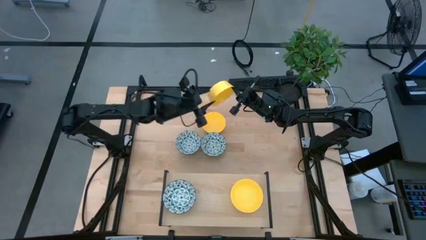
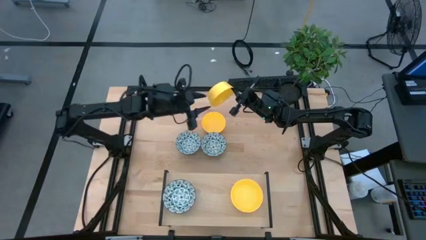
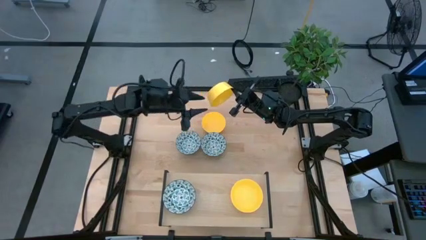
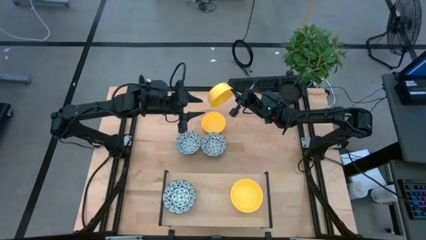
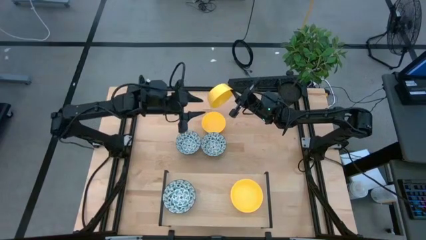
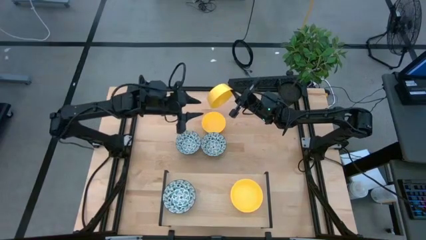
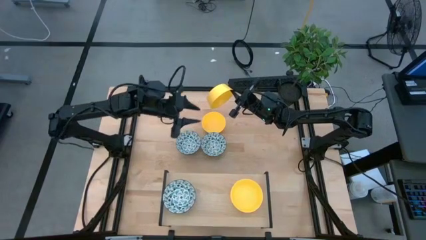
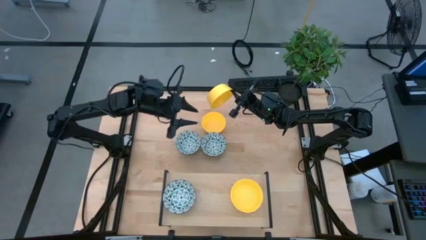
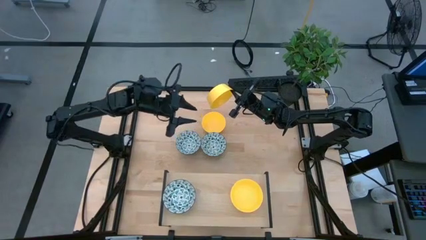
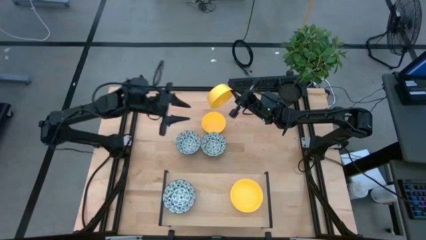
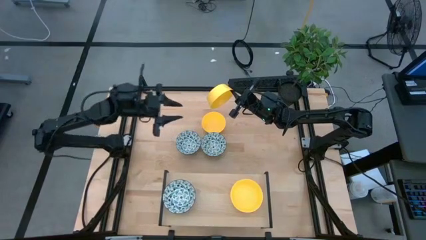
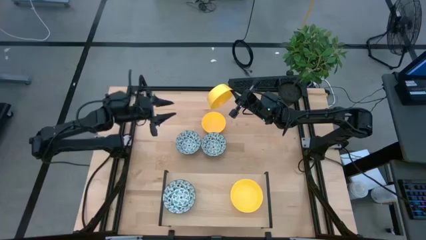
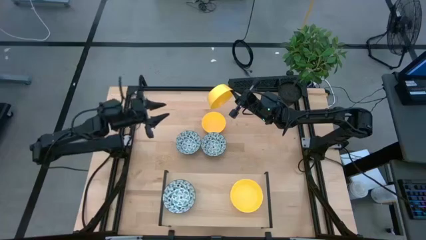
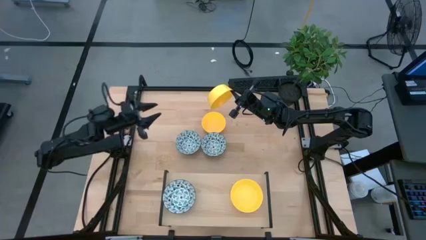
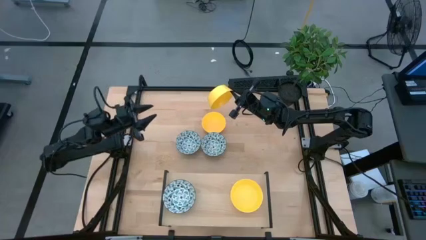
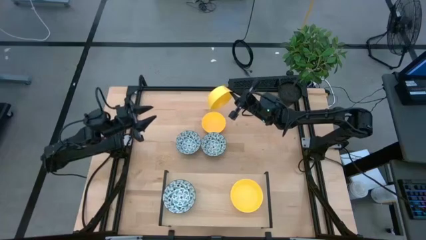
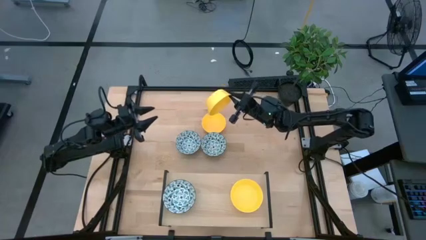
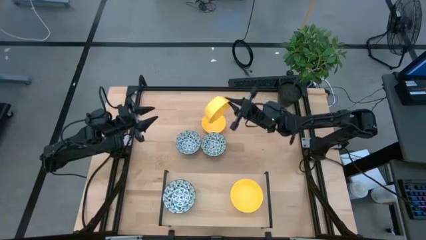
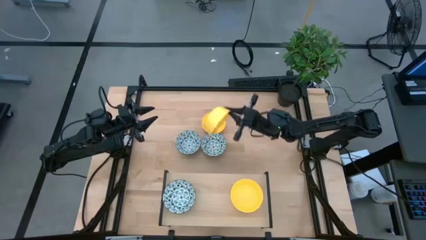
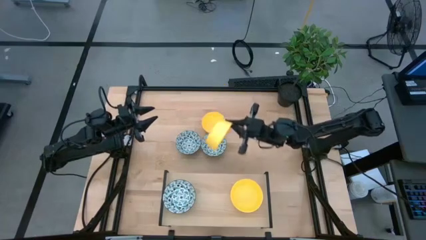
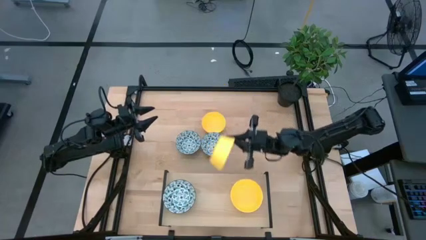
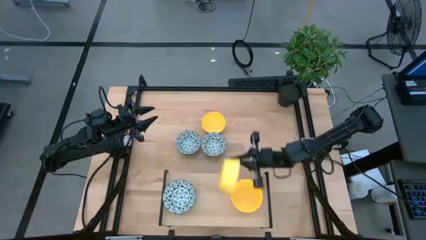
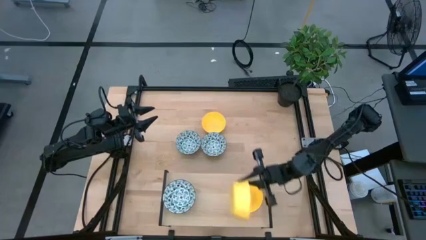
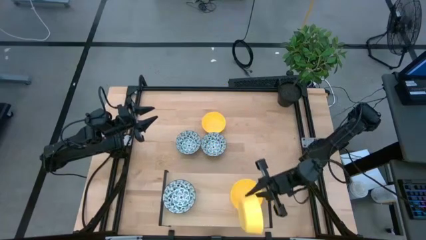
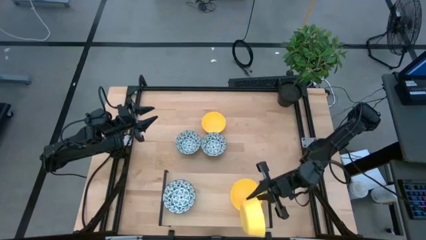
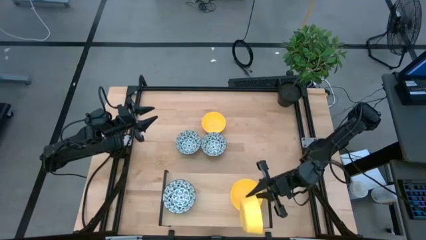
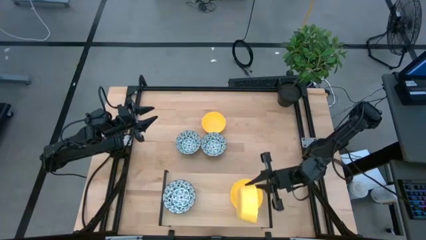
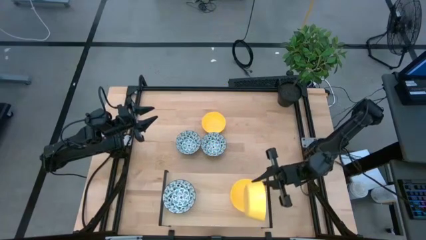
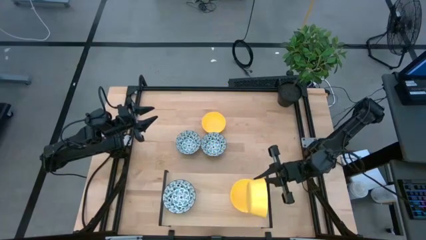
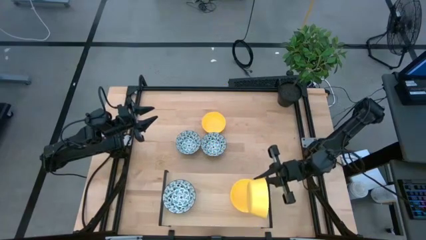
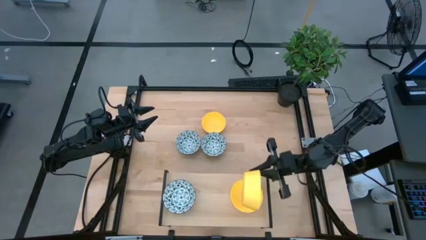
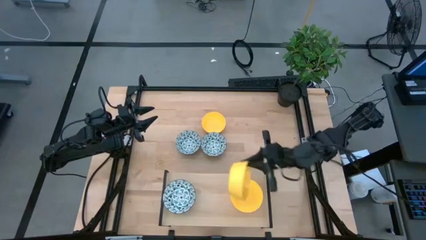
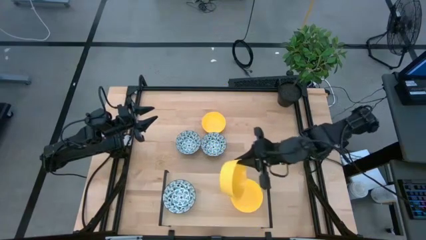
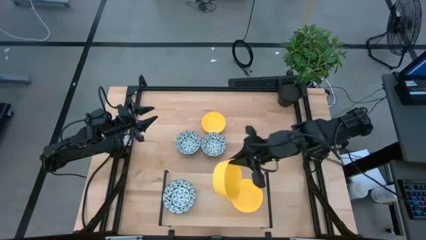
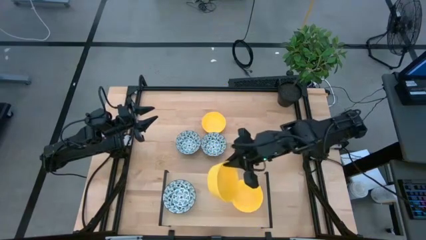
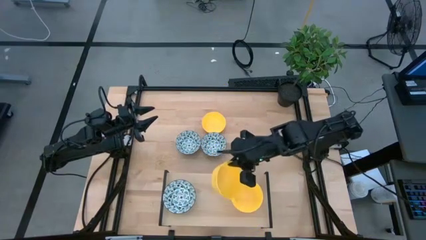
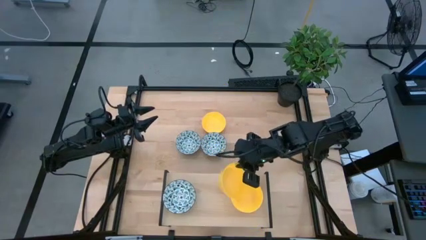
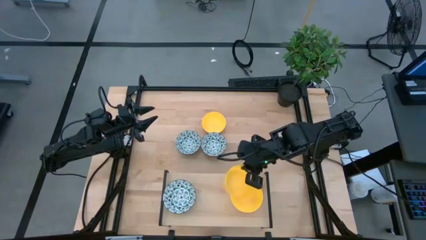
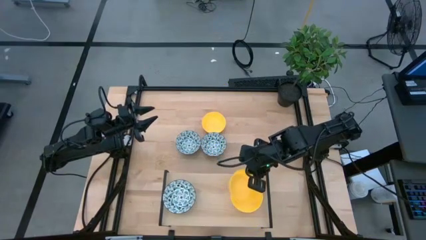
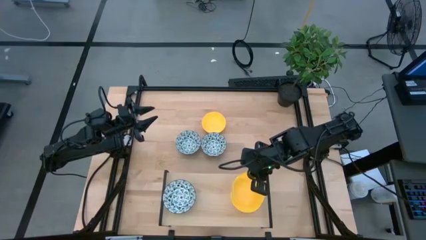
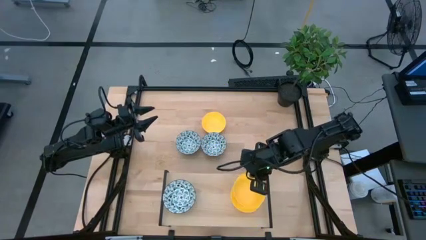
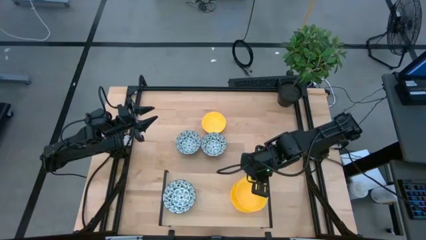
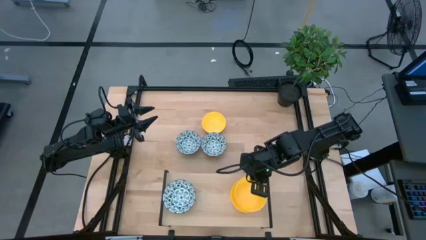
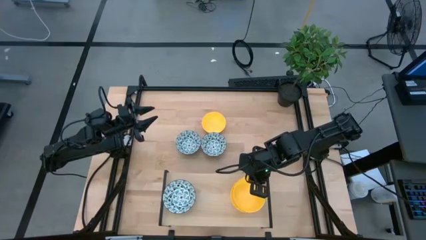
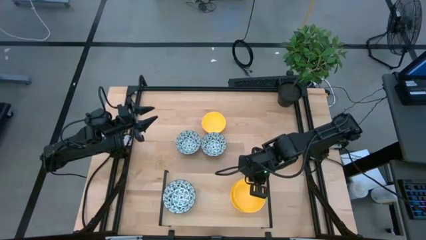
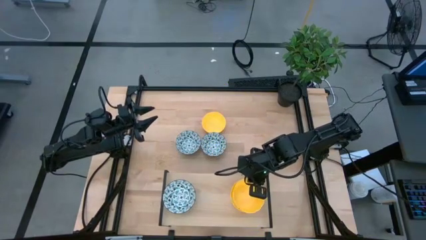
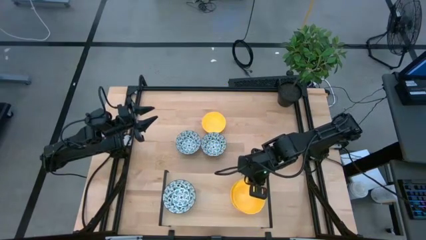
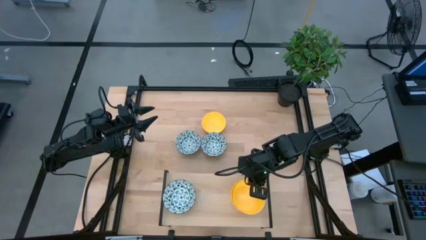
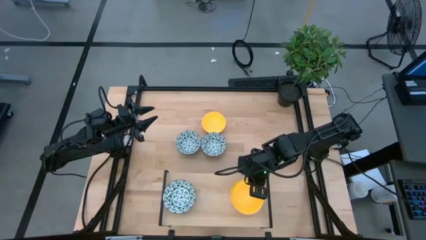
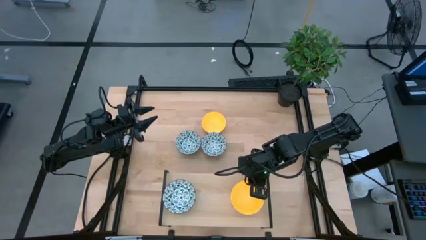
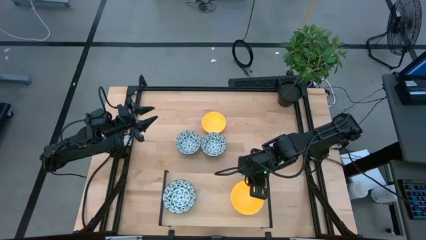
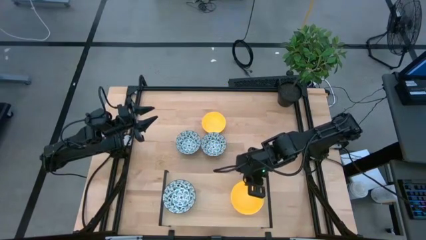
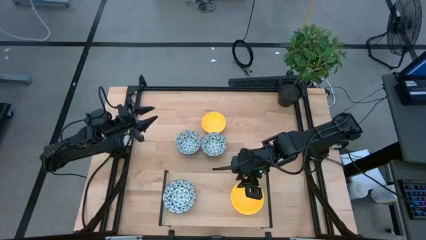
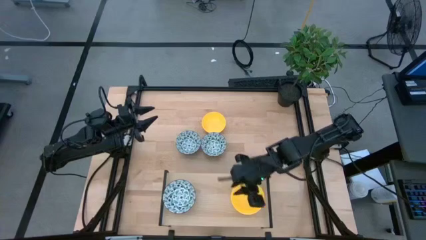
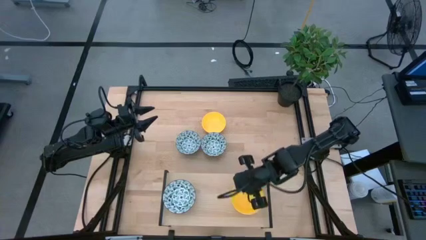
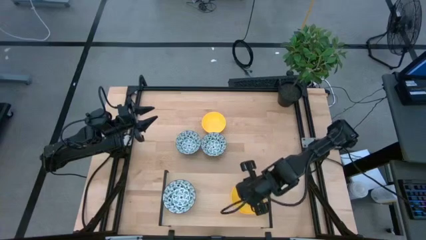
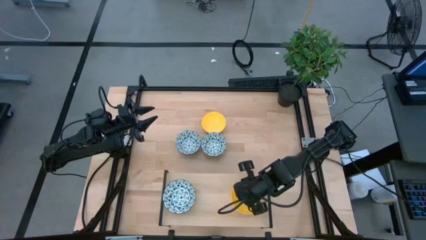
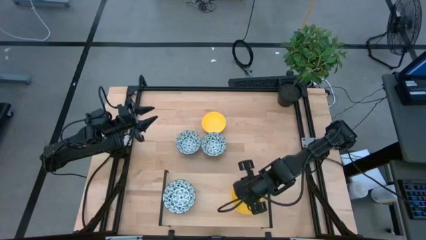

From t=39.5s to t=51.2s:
Task: Pick & Place Mini bowls
Stack the left yellow bowl on the yellow bowl on the shelf
